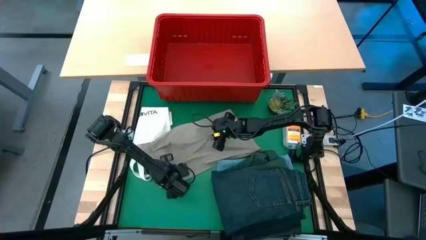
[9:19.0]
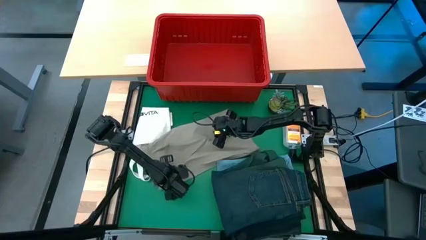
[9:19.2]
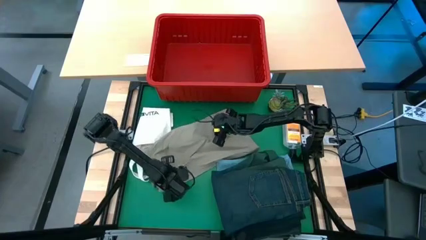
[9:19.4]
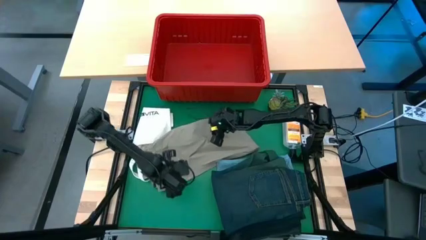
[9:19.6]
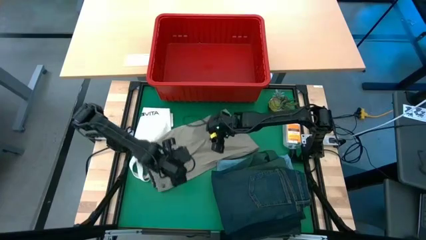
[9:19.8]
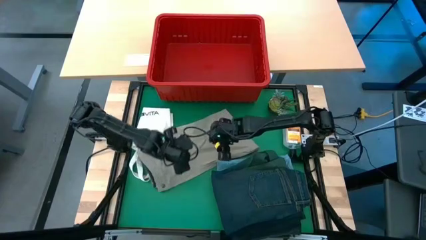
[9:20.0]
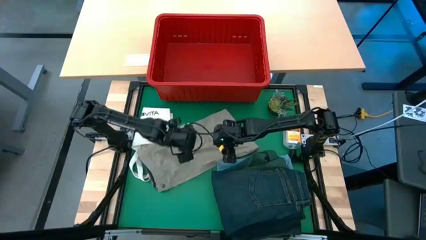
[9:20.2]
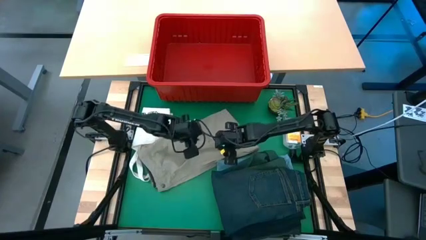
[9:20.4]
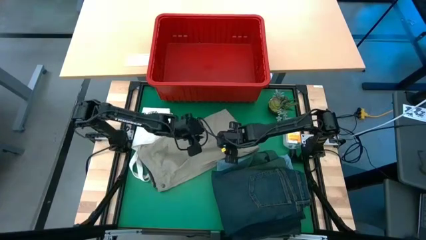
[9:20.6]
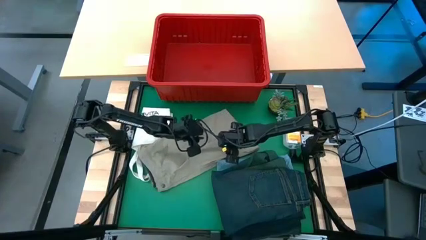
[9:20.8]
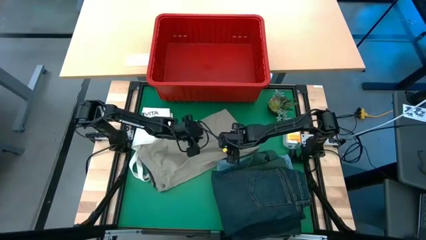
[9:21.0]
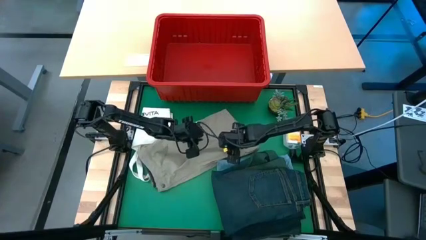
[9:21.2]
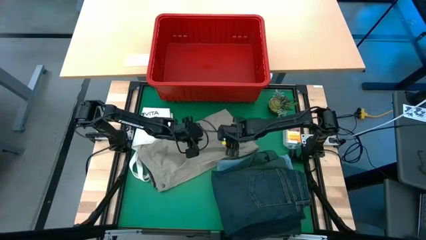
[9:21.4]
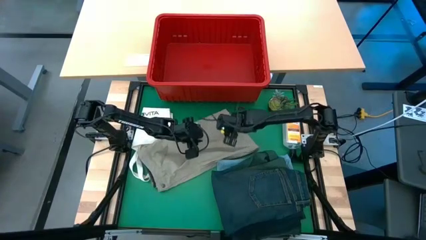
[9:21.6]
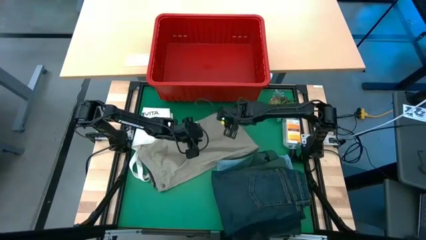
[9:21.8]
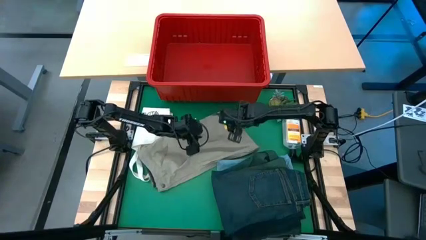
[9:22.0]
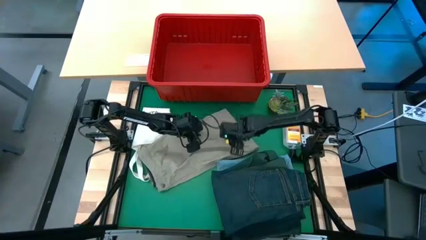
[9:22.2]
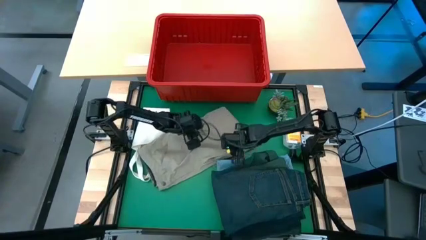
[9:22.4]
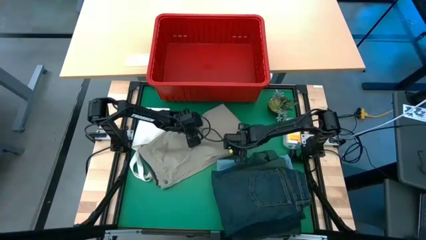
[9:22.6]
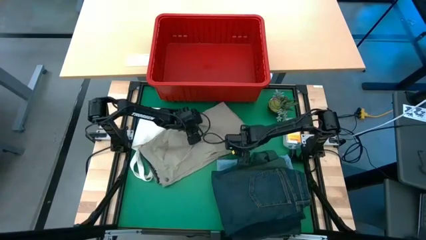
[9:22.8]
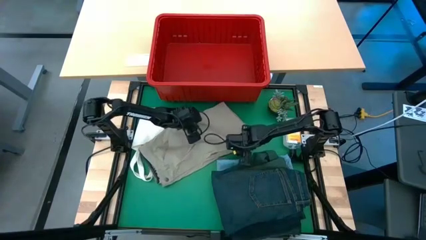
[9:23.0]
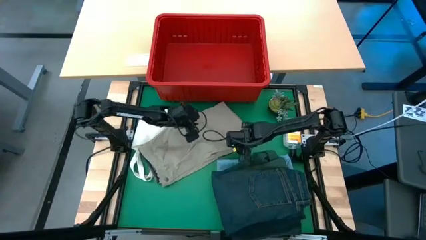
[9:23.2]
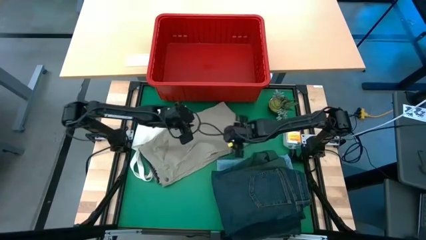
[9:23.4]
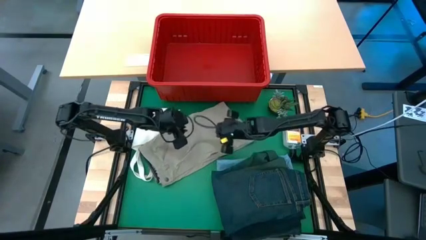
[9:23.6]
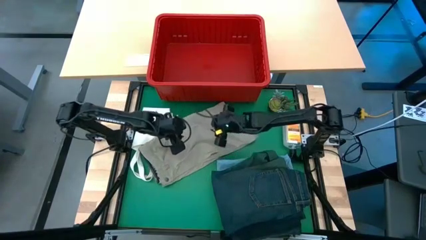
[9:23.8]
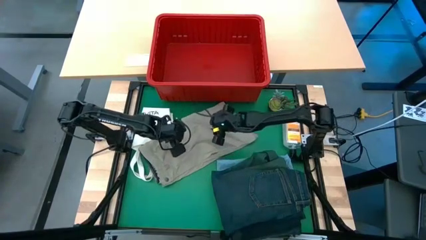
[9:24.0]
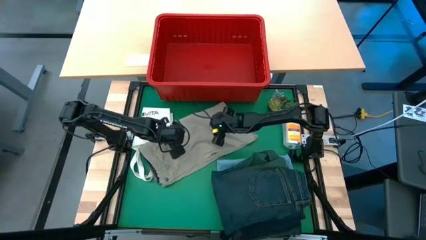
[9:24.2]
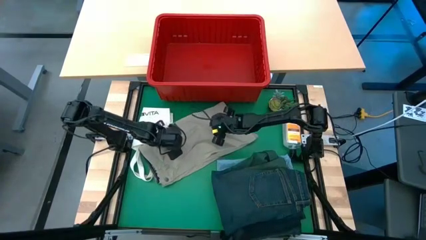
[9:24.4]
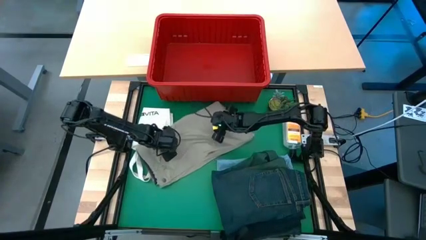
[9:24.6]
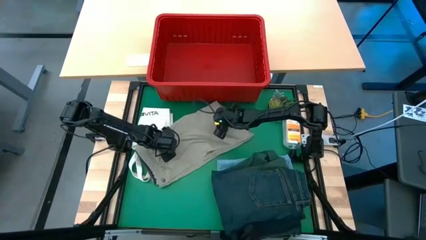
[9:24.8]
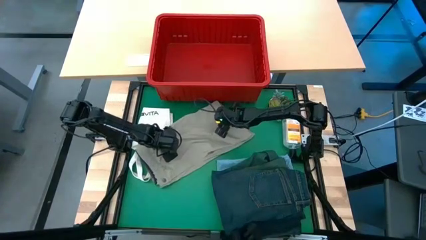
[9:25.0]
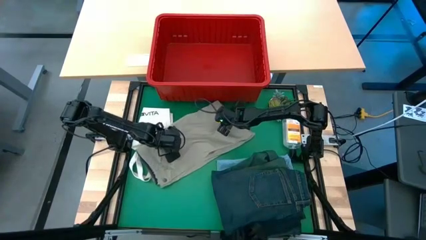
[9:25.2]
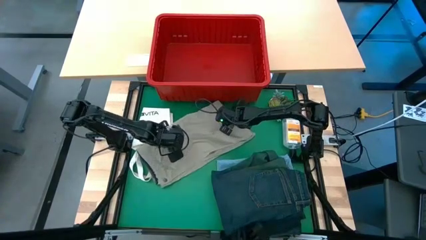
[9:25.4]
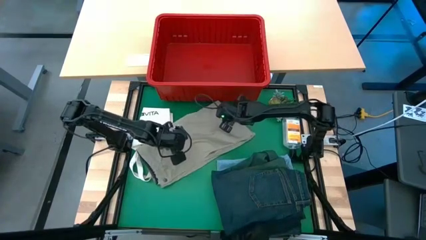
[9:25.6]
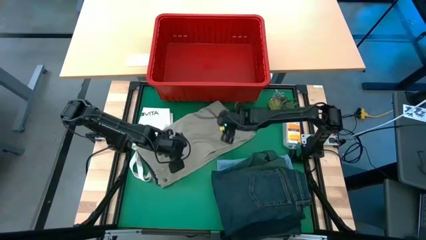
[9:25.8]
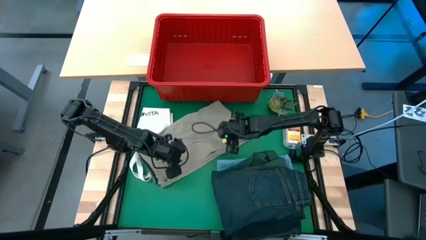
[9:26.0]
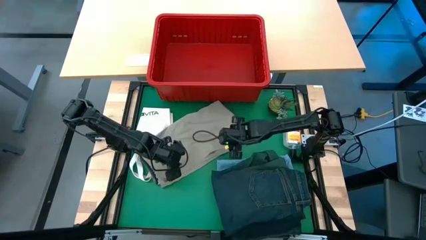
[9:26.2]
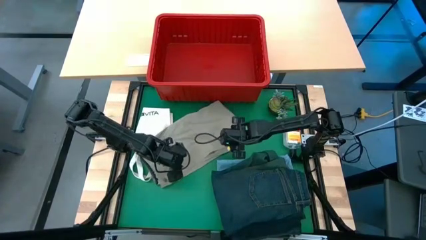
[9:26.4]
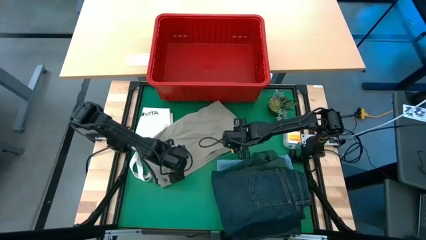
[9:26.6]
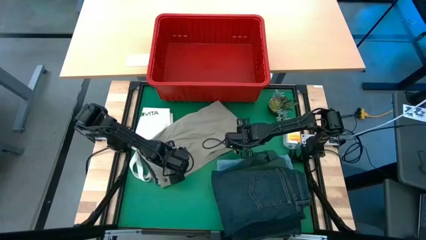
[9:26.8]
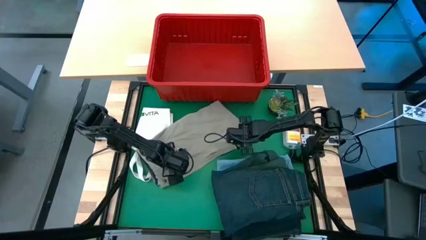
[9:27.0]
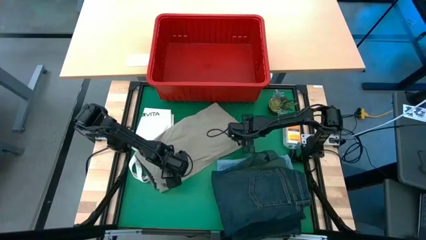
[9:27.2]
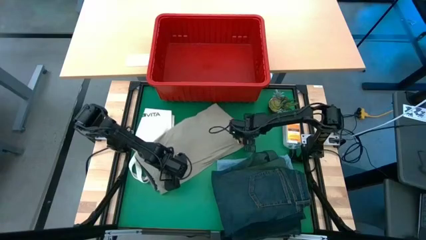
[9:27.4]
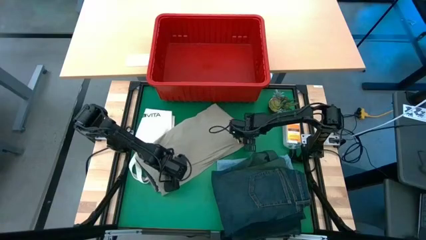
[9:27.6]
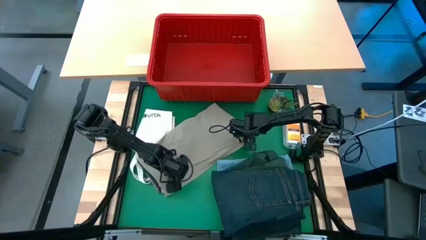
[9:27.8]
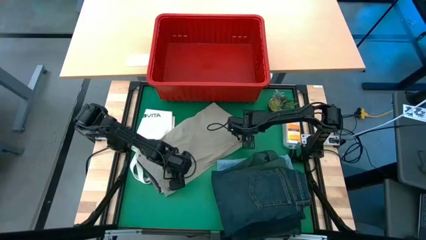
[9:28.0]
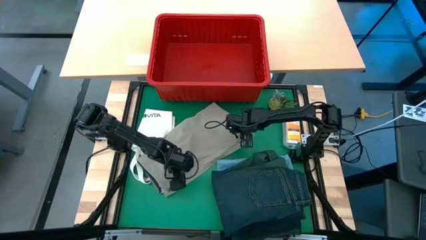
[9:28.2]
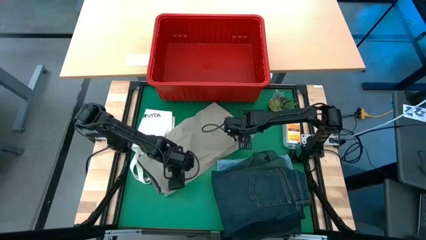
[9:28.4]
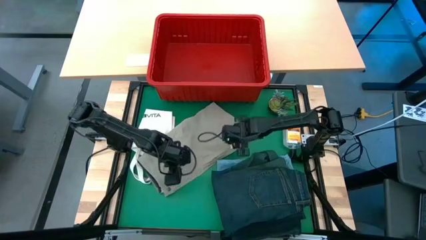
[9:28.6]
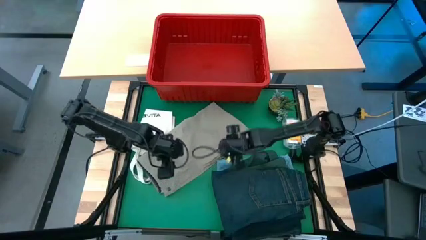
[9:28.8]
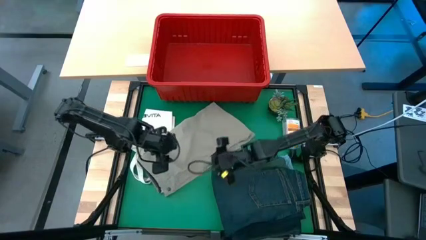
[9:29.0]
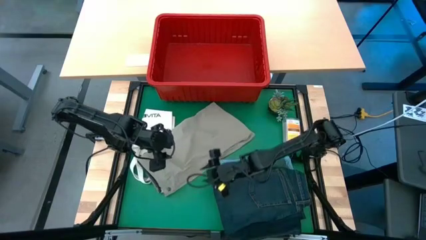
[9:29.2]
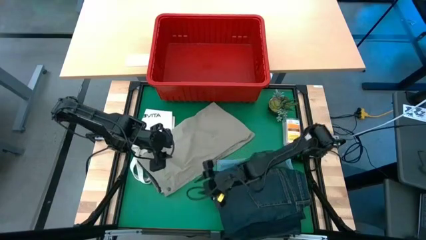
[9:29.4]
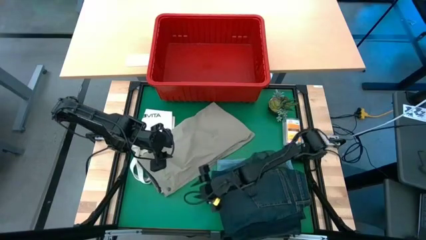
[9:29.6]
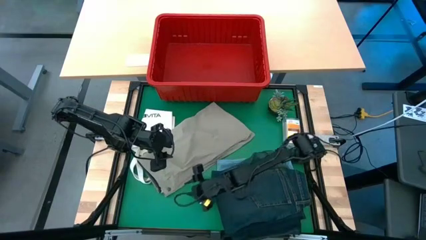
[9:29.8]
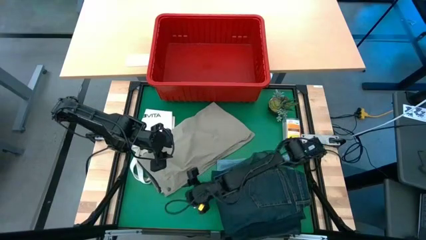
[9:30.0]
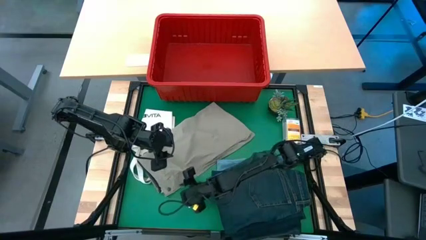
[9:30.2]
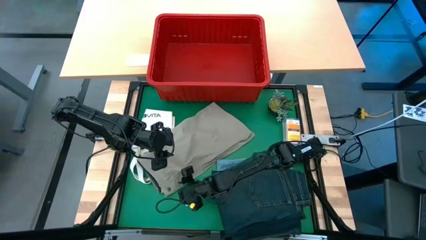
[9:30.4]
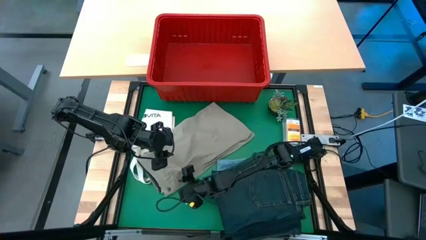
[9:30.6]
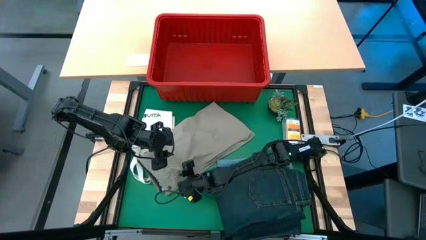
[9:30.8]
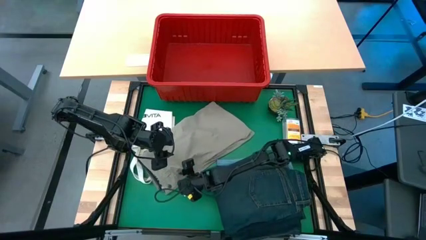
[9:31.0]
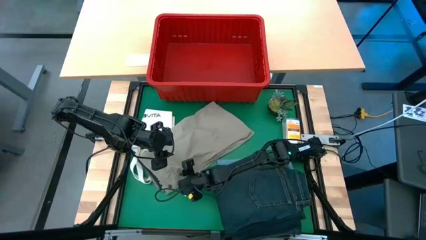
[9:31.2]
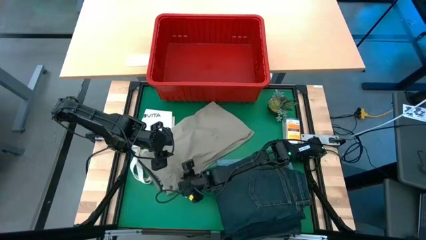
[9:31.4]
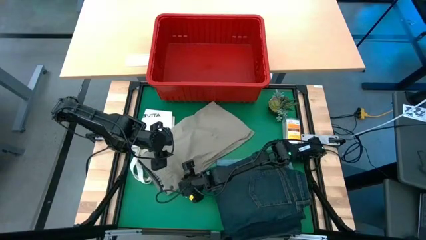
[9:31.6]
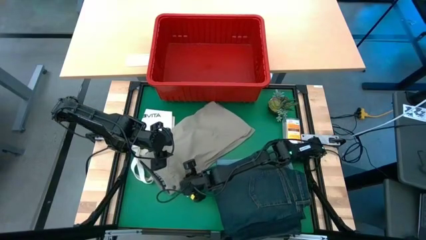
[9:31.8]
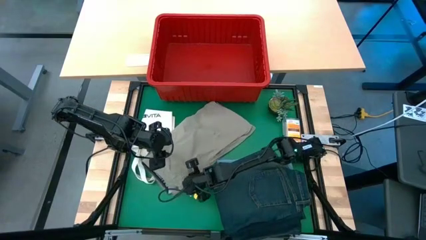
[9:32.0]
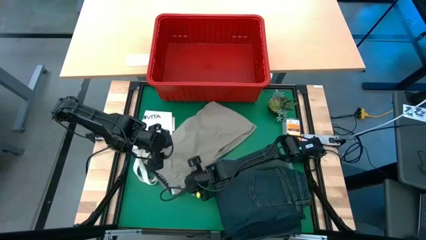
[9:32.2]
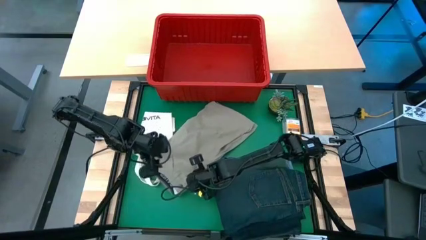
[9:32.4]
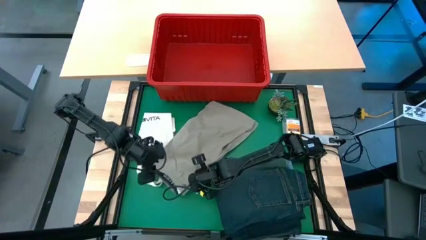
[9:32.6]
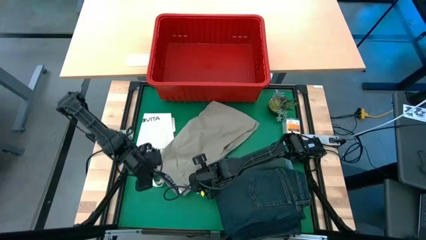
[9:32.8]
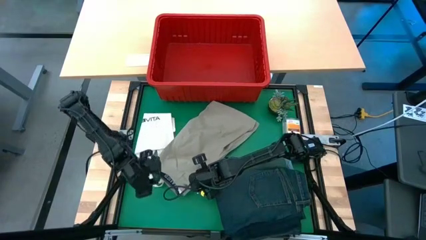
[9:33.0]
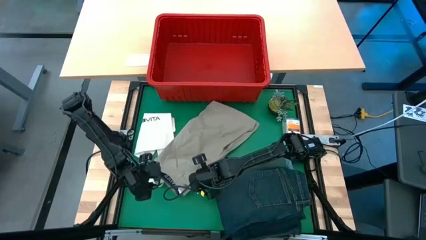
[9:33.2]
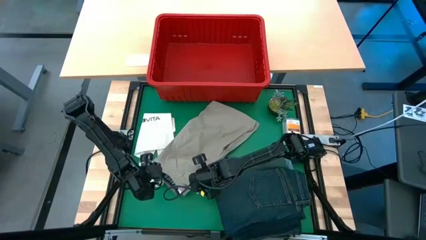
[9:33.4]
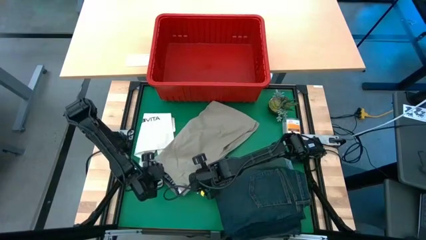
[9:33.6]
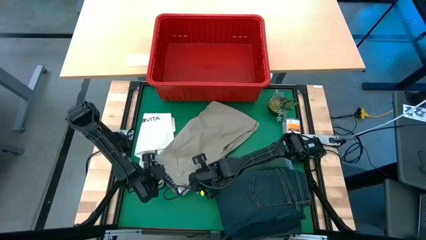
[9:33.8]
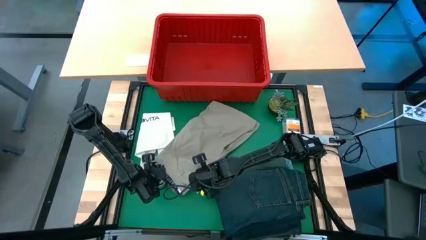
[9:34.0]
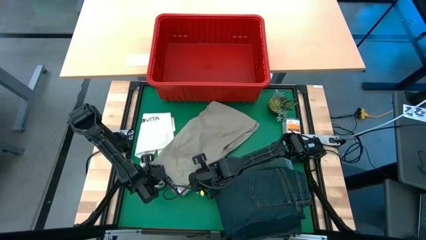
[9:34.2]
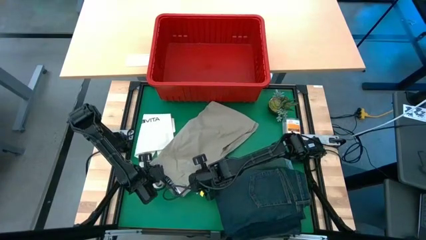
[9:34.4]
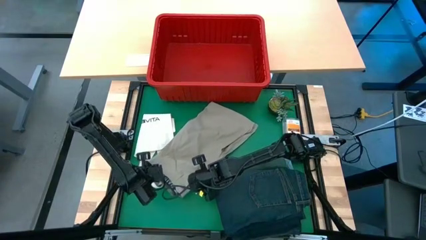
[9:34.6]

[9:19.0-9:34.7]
Task: Fold Laundry from Bin
Fold the brown shorts
